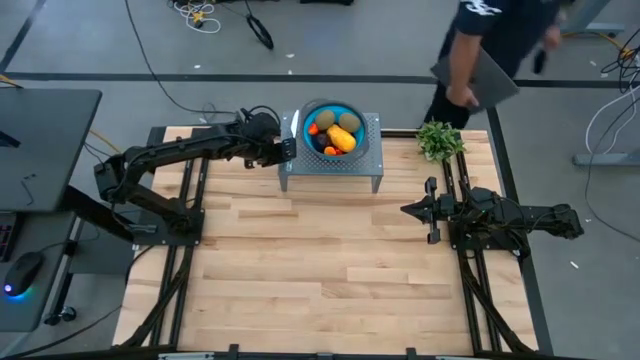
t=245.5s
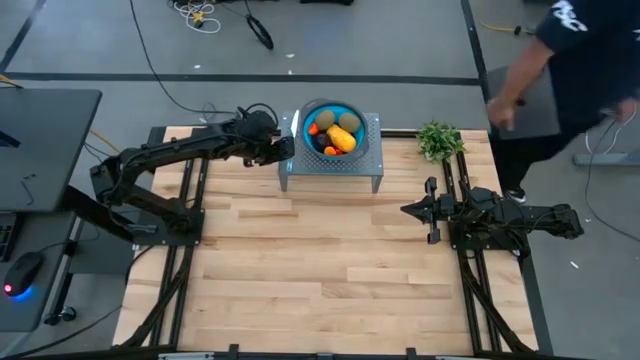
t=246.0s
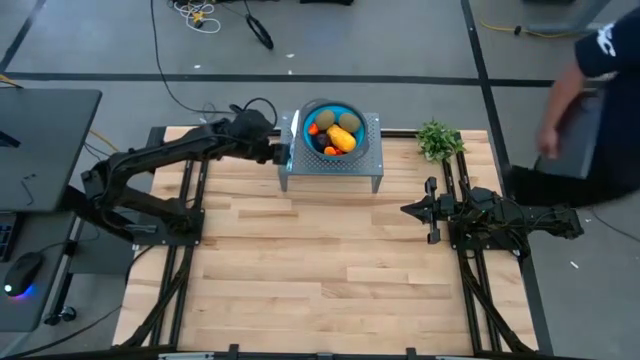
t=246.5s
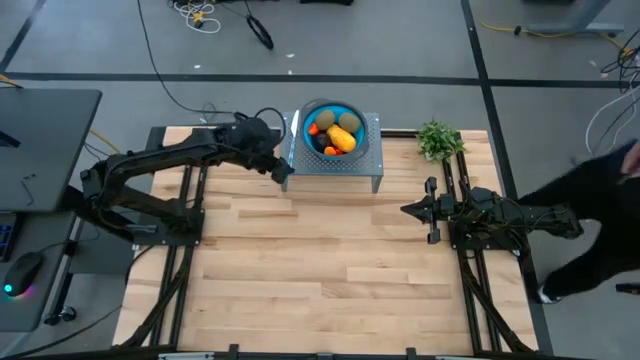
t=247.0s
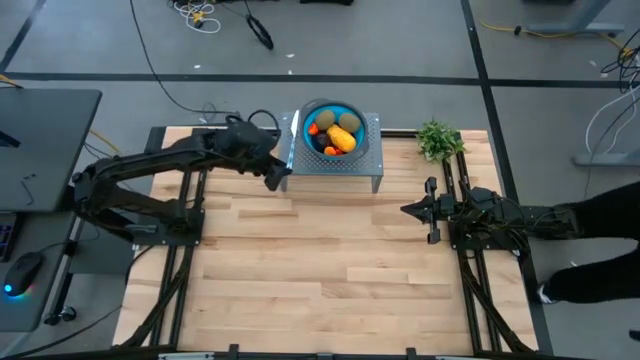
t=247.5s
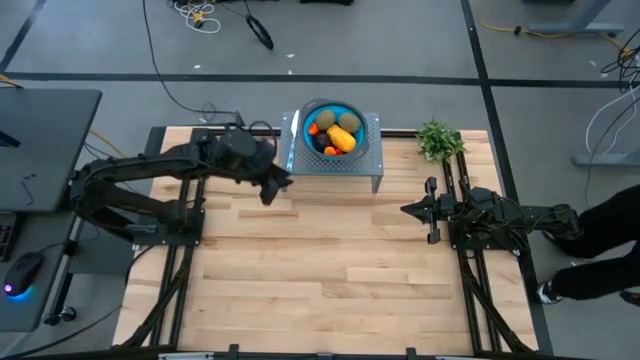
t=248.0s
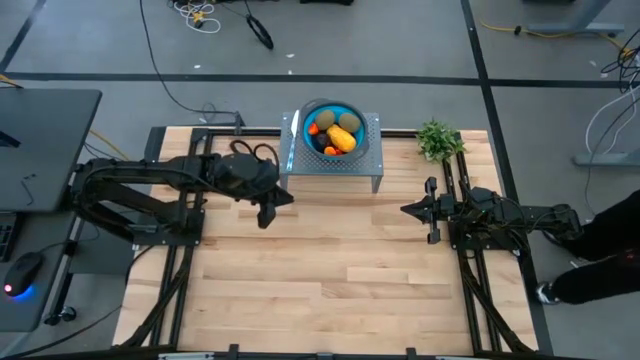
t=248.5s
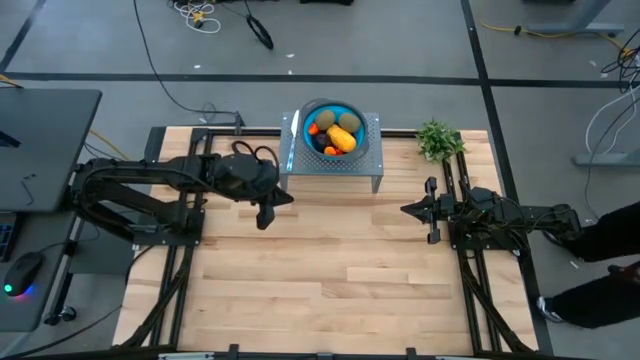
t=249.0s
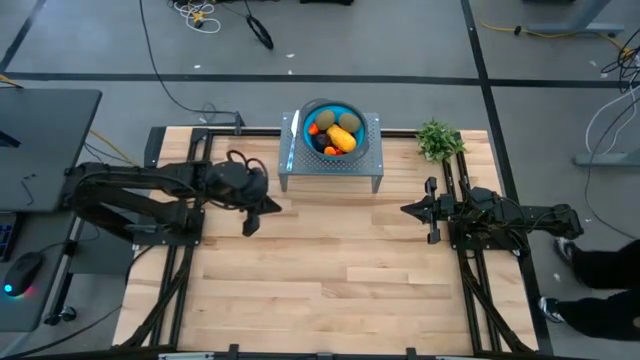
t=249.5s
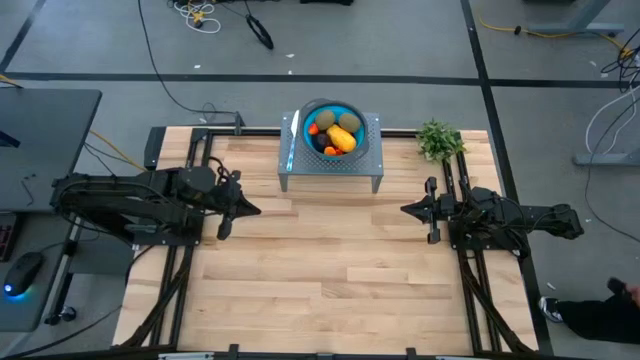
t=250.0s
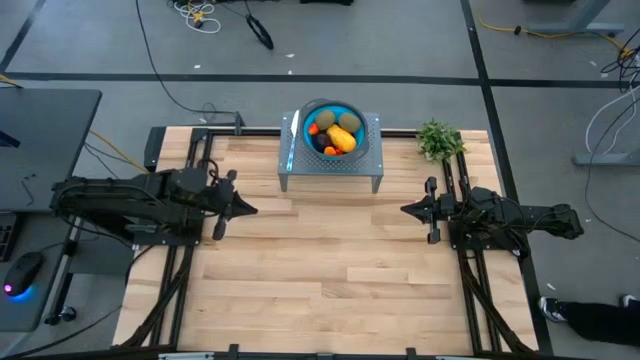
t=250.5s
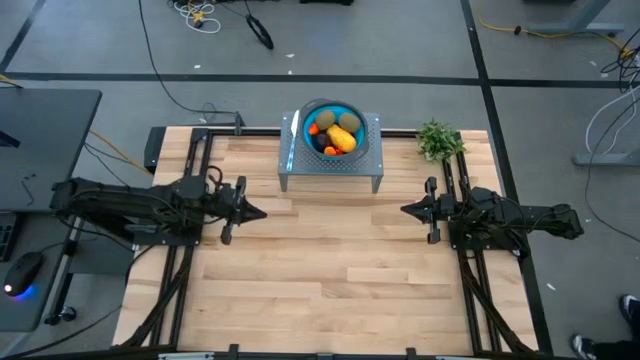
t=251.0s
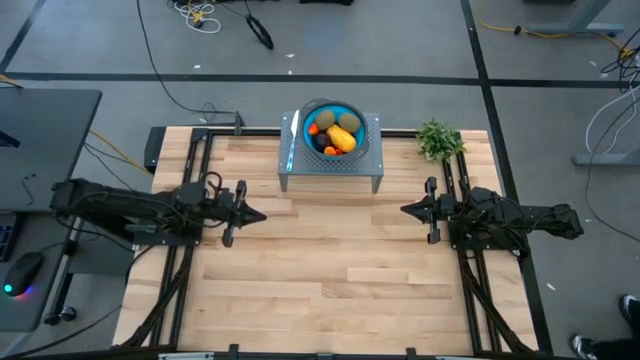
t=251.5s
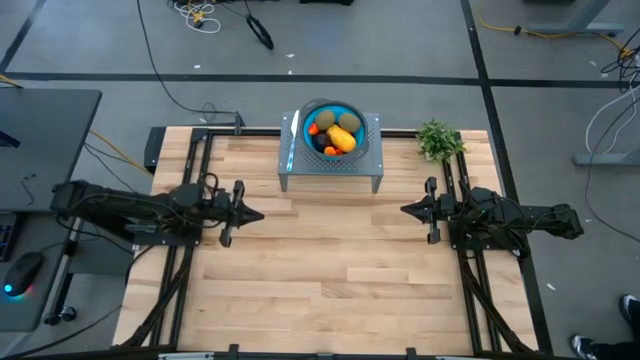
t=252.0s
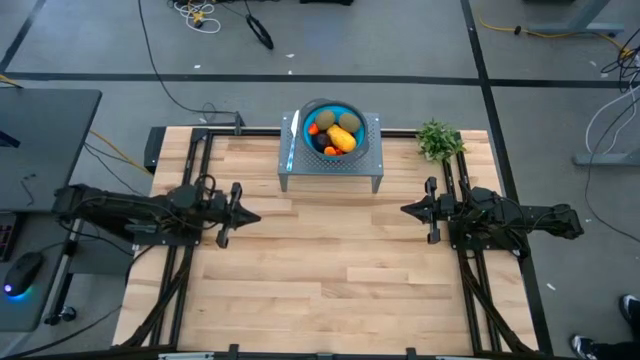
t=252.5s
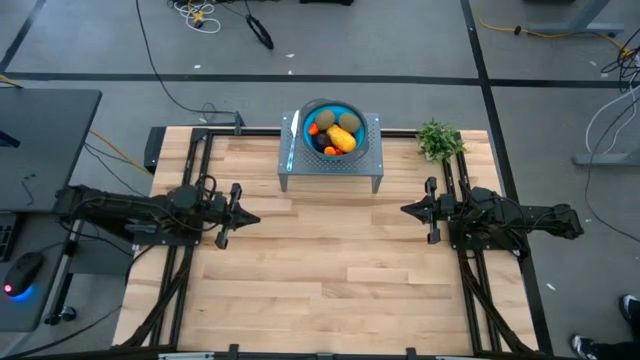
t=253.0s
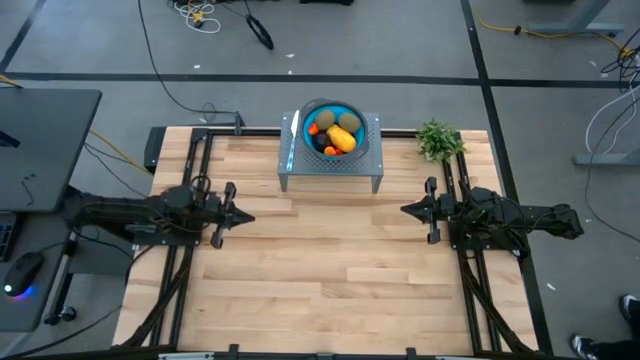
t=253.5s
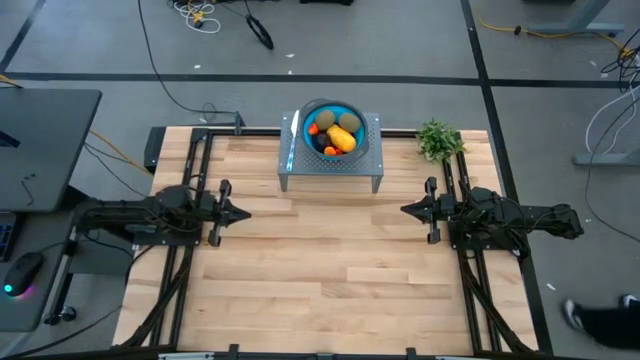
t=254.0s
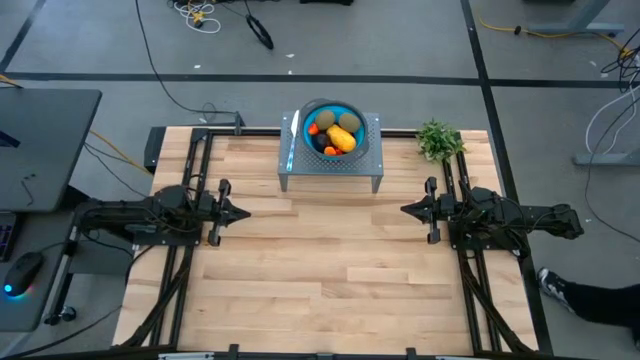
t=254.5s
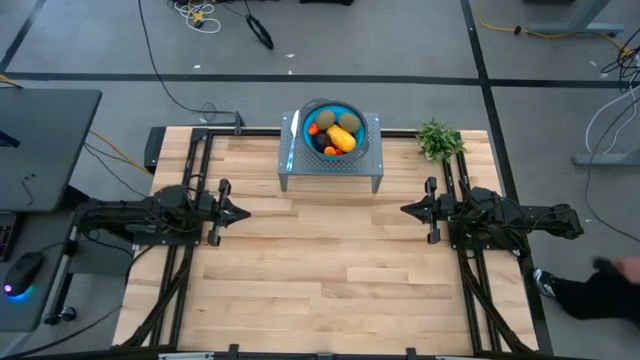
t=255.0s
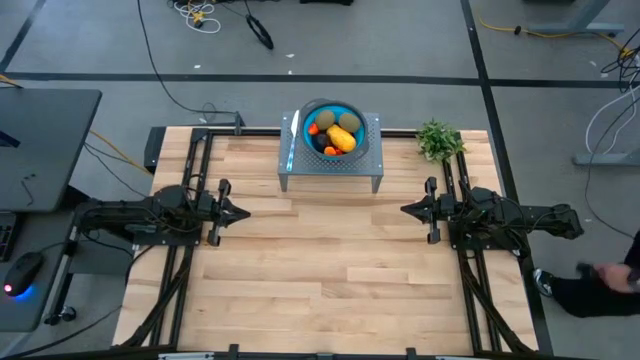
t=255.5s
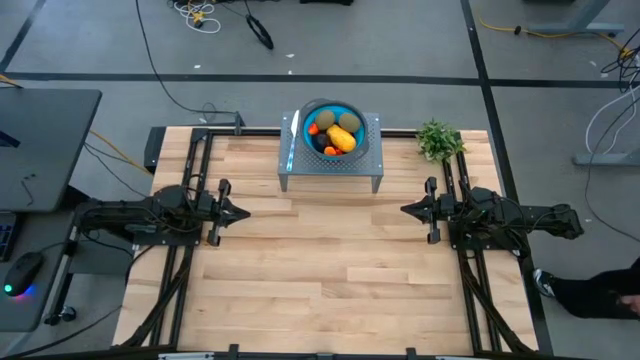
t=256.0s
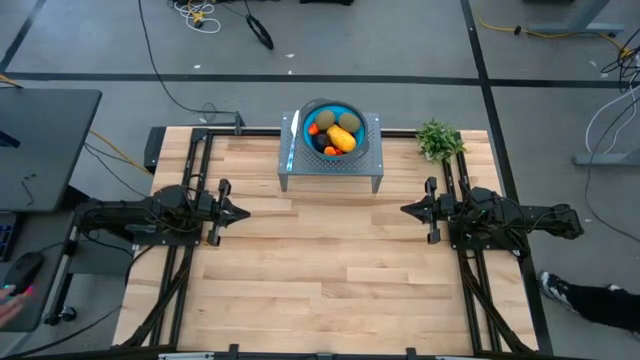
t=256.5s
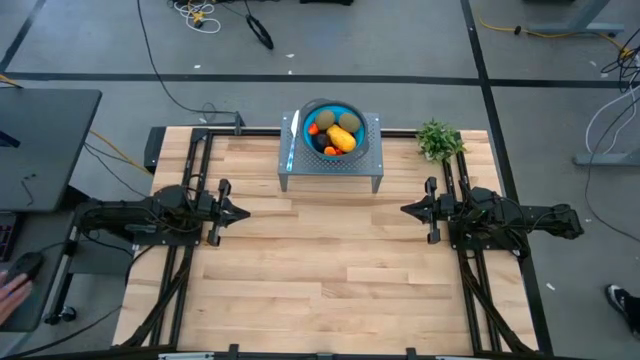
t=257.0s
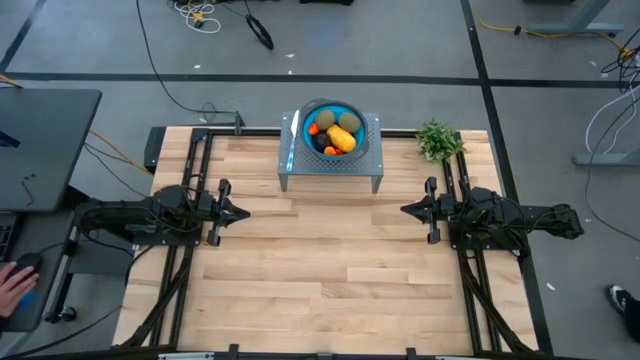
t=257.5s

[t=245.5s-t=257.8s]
Task: Pick & Place Fruit
Return to Home Position
